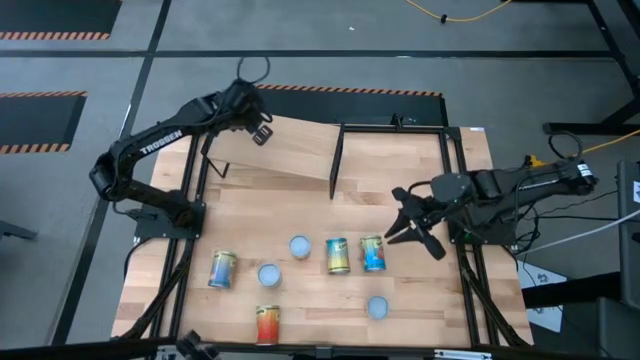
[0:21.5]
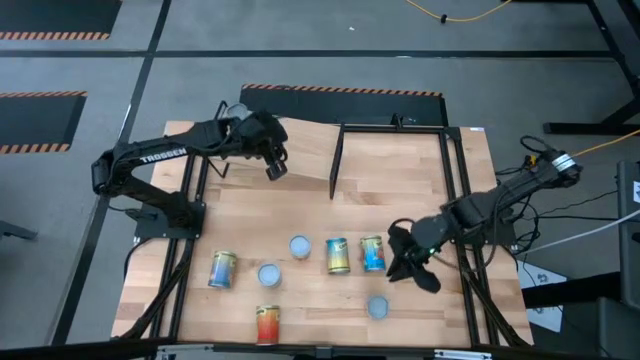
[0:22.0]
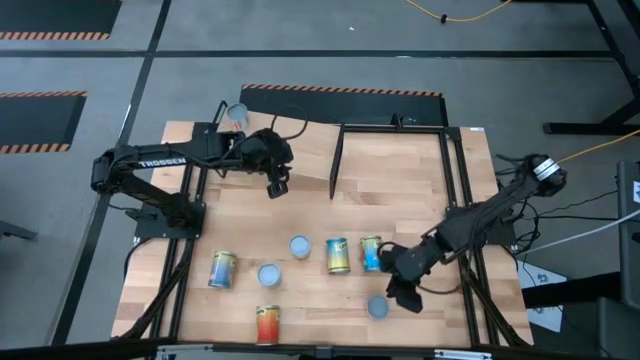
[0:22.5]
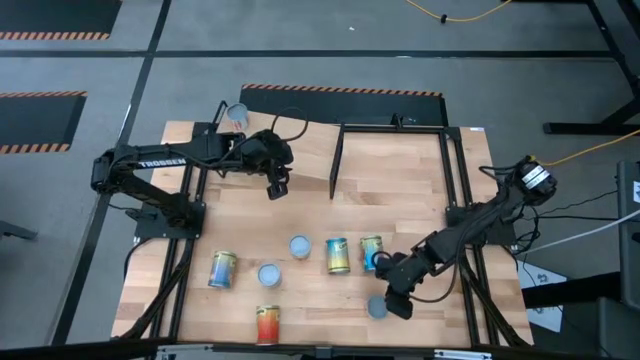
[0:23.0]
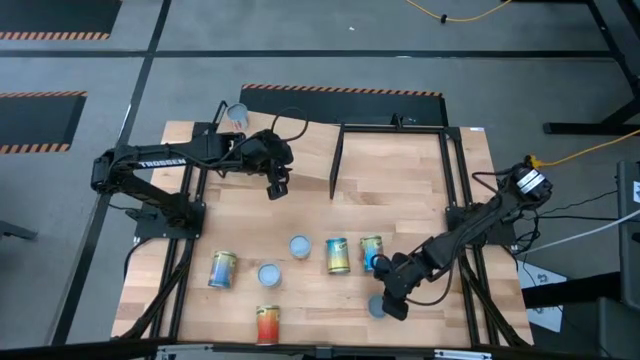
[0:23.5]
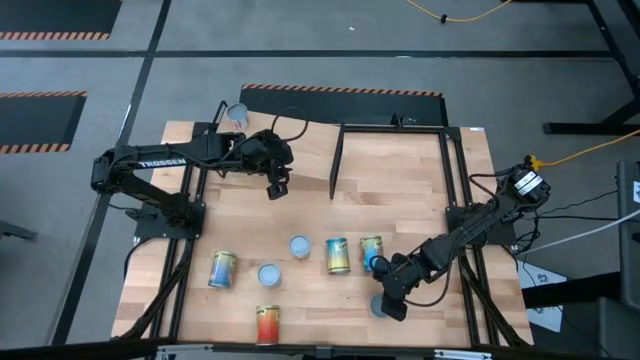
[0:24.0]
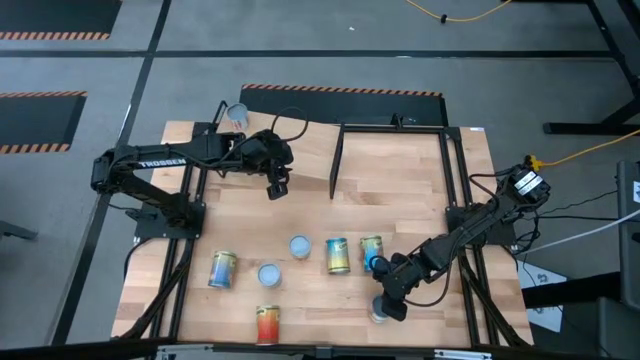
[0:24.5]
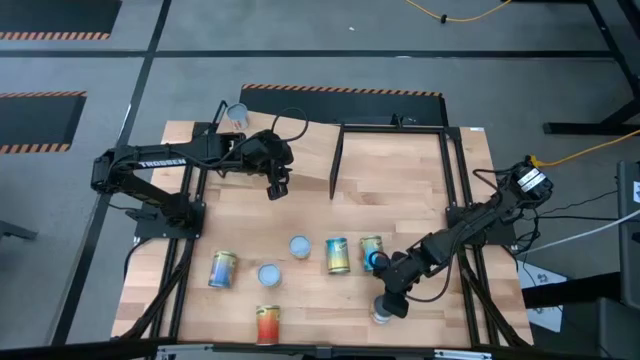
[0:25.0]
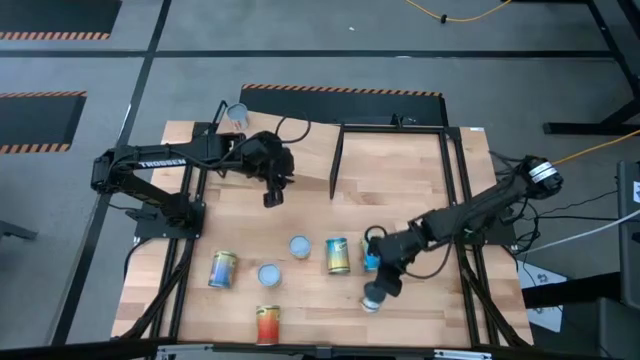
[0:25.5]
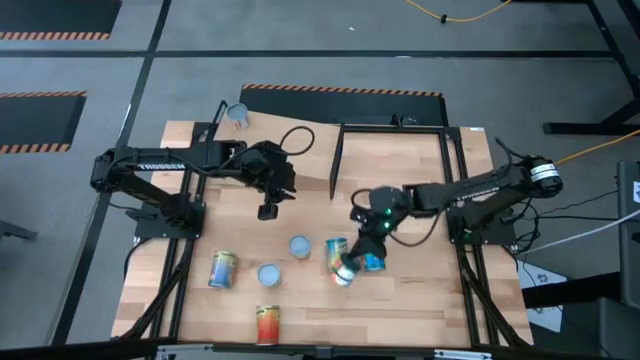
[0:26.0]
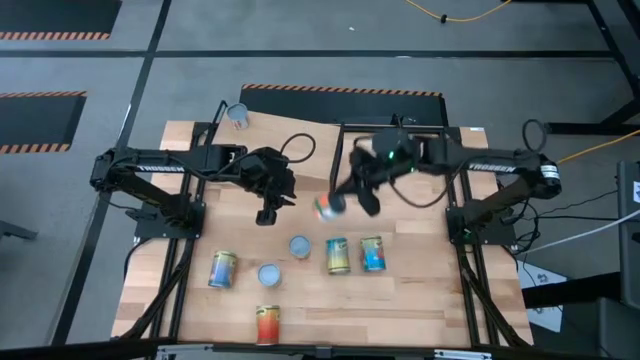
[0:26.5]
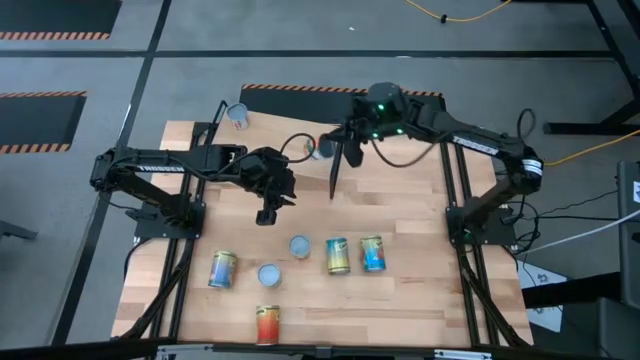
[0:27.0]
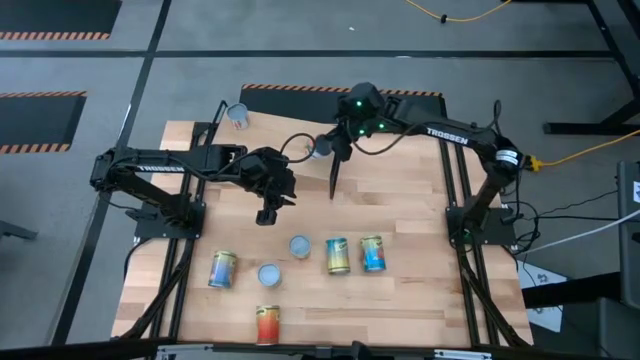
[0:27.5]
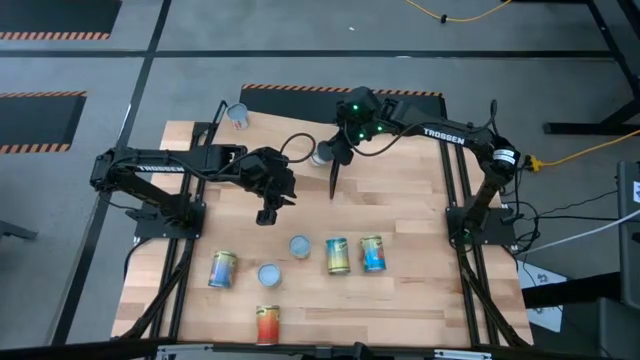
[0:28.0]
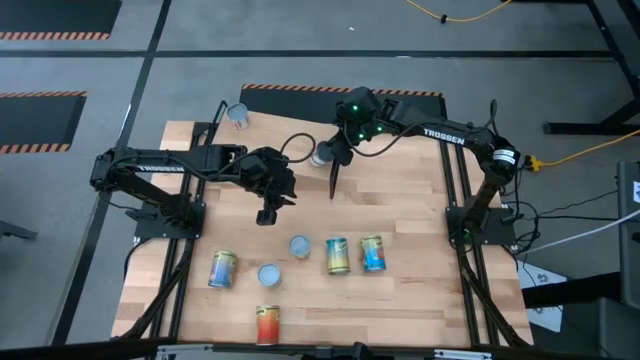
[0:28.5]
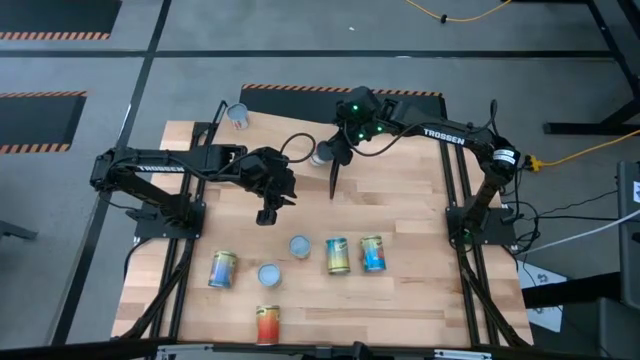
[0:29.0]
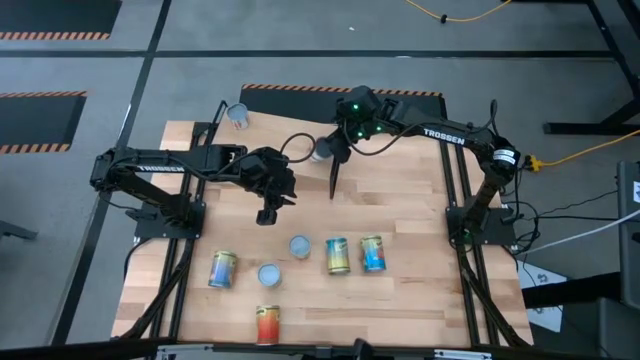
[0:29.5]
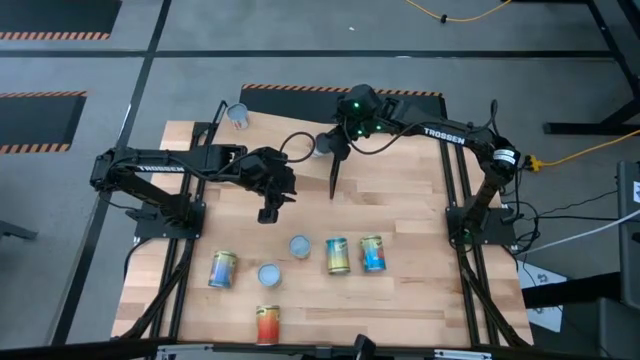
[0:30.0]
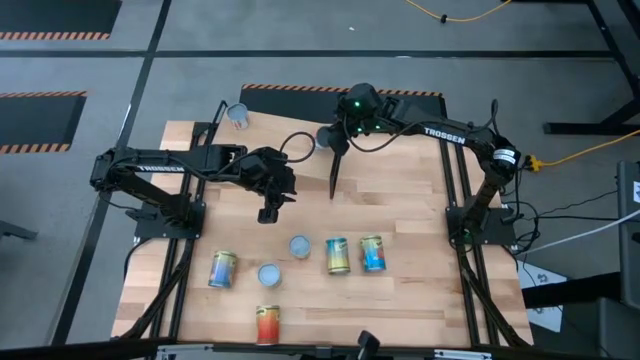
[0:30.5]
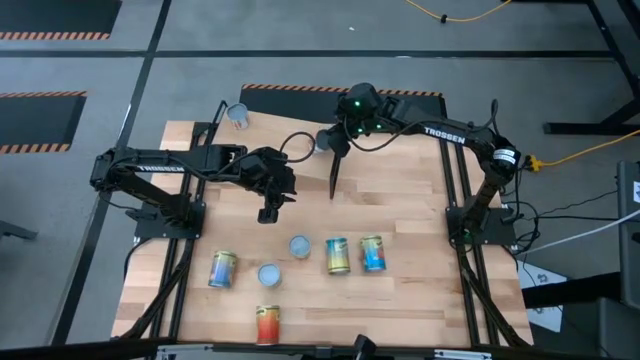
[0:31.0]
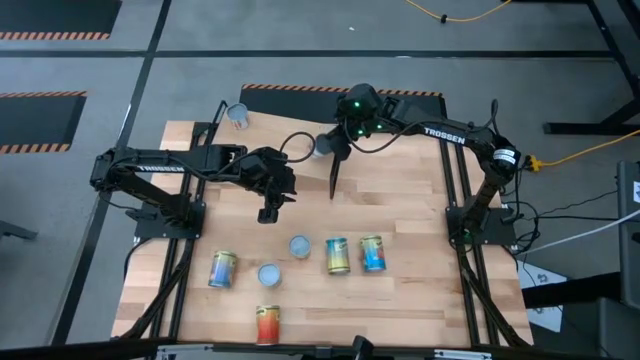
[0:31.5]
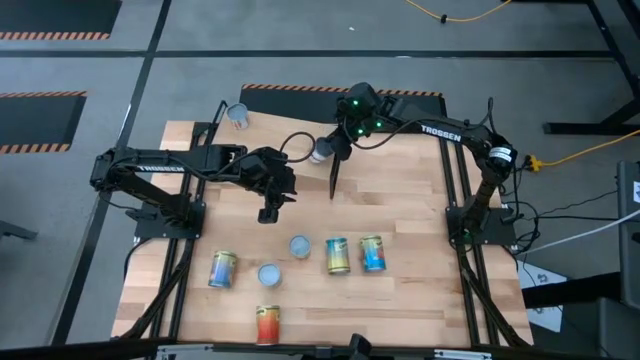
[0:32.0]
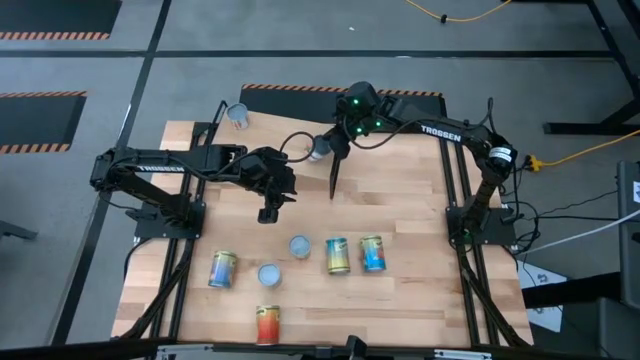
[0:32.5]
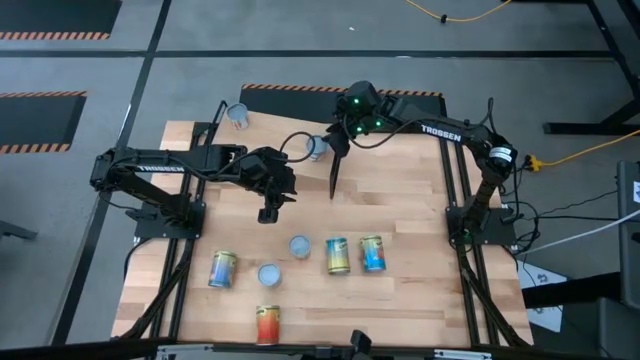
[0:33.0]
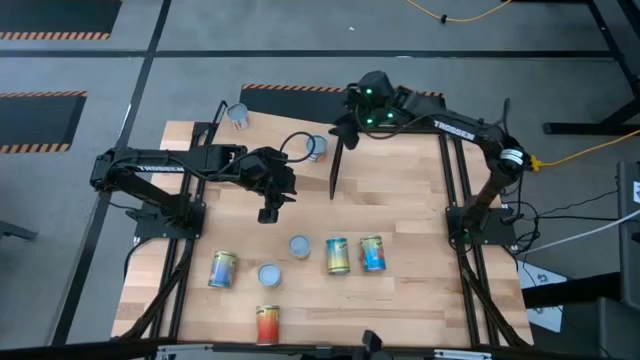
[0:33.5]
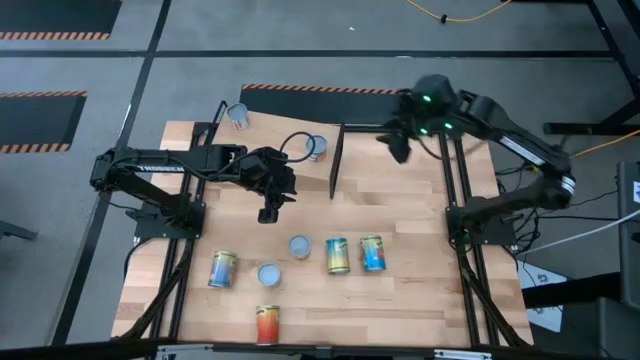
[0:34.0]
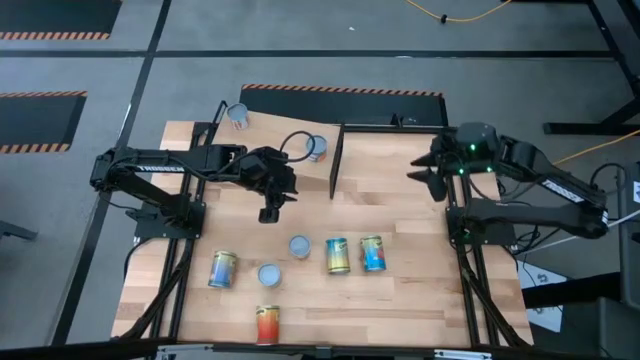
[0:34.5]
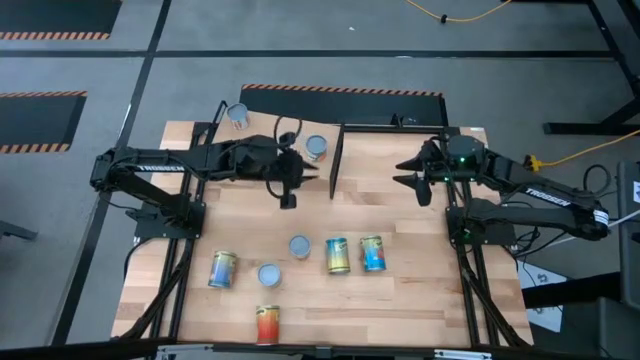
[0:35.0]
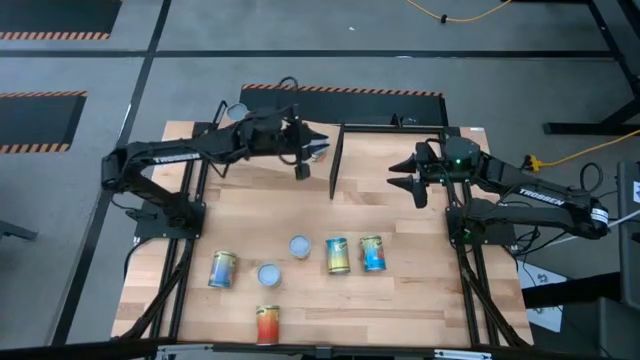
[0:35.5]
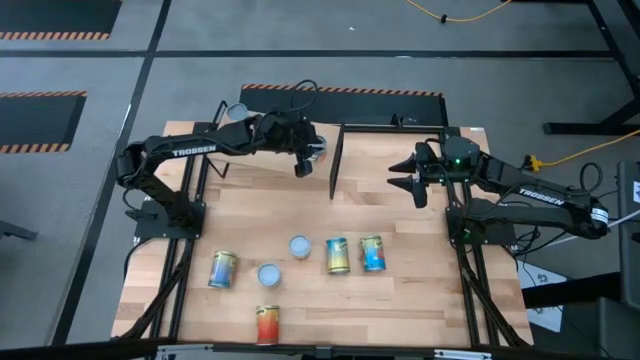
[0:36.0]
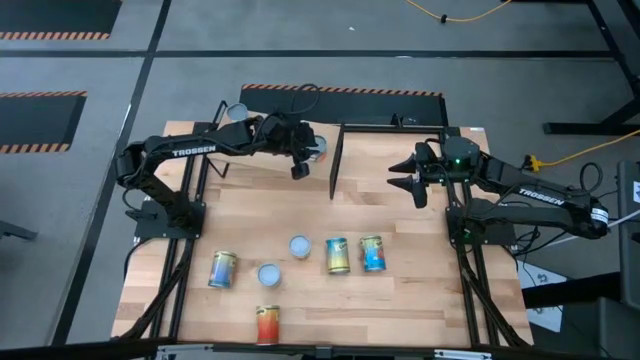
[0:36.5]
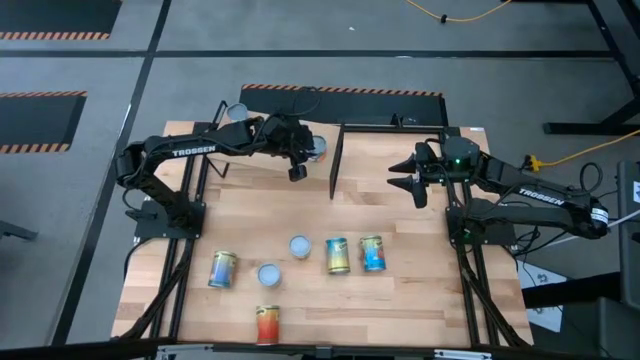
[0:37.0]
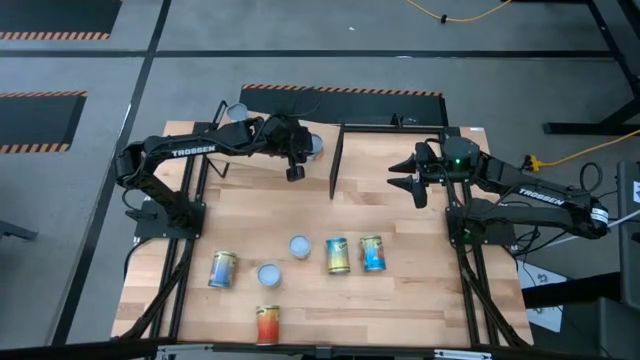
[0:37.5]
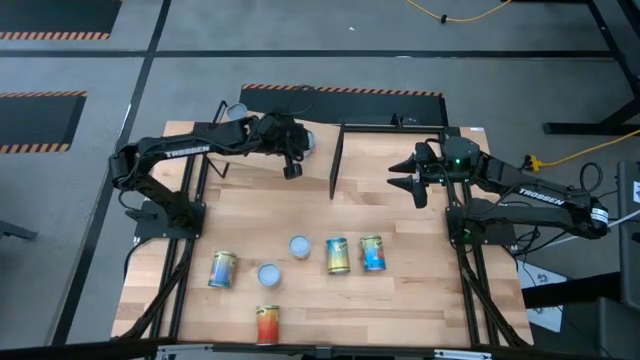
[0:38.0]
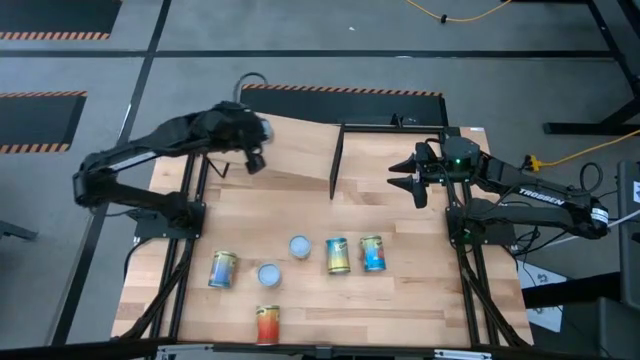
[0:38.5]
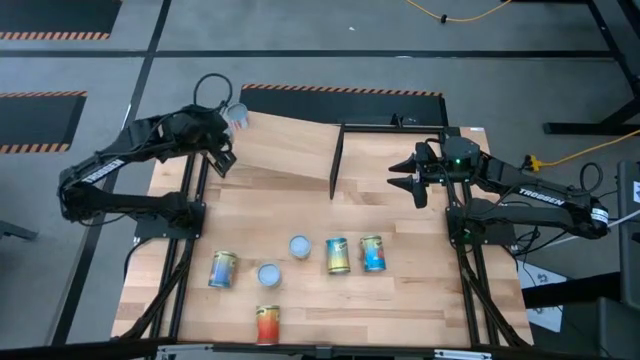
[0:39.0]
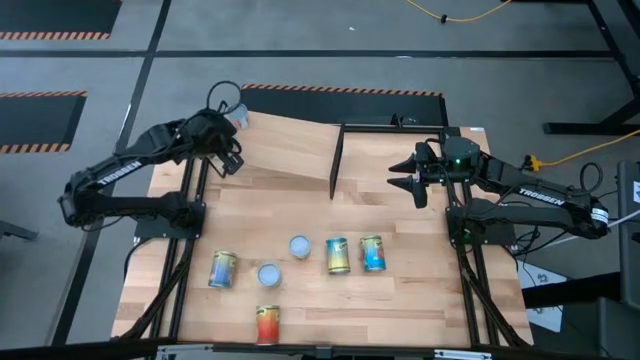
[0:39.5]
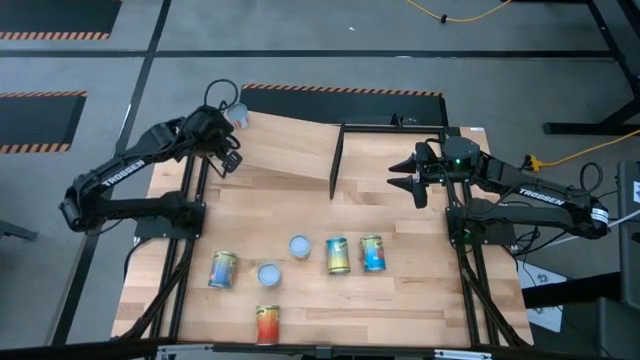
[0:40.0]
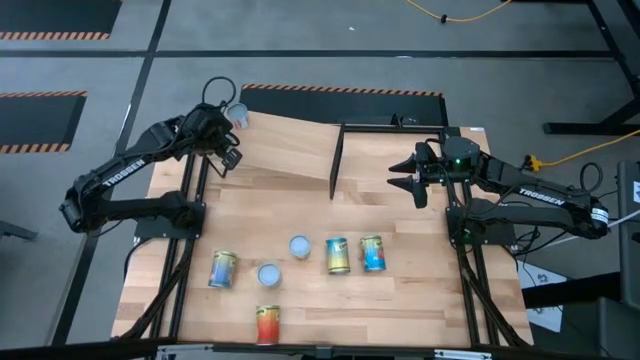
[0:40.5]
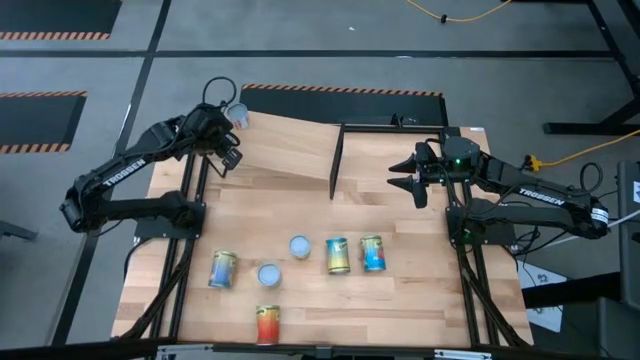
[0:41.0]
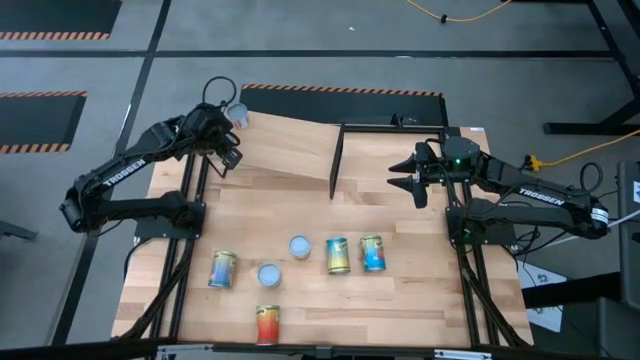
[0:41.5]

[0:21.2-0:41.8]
Task: Pick and place cans onto a shelf
Put the canned oranges on the shelf aligned with the other white canned carrot
